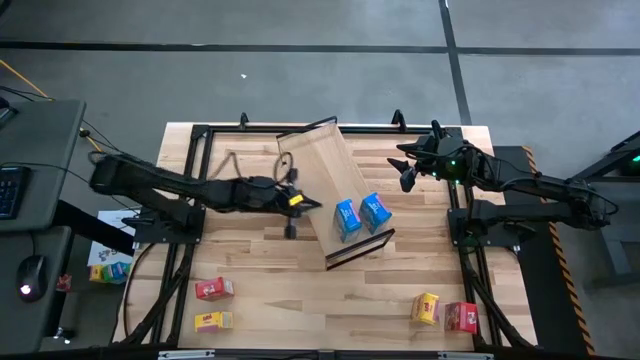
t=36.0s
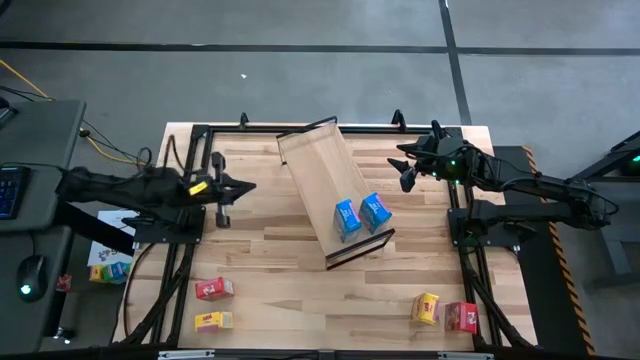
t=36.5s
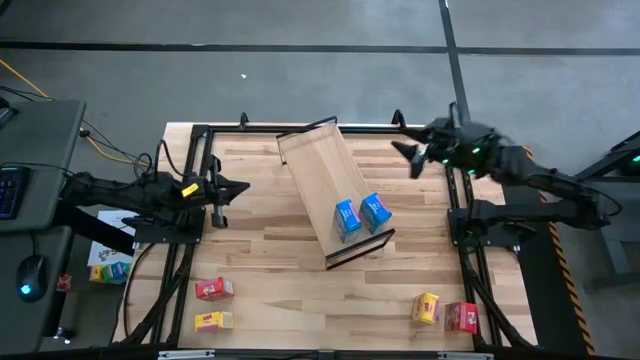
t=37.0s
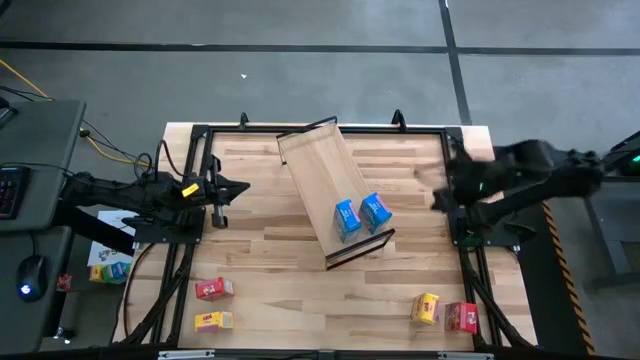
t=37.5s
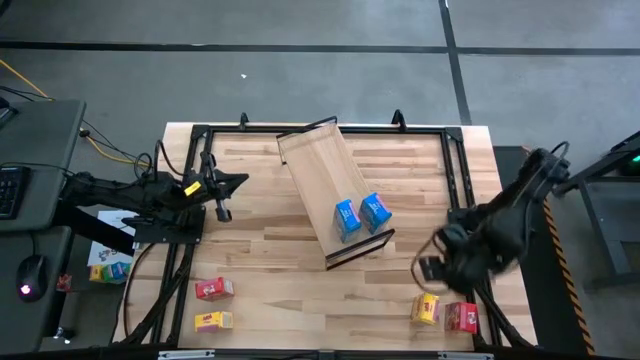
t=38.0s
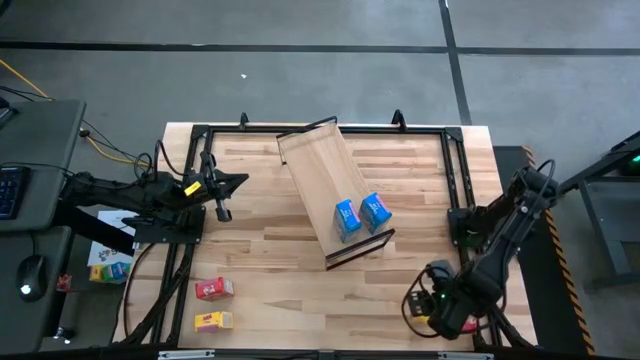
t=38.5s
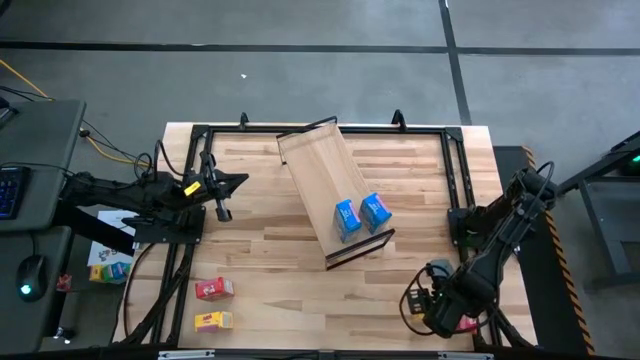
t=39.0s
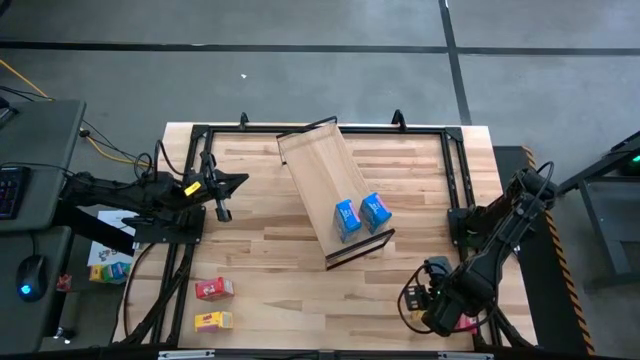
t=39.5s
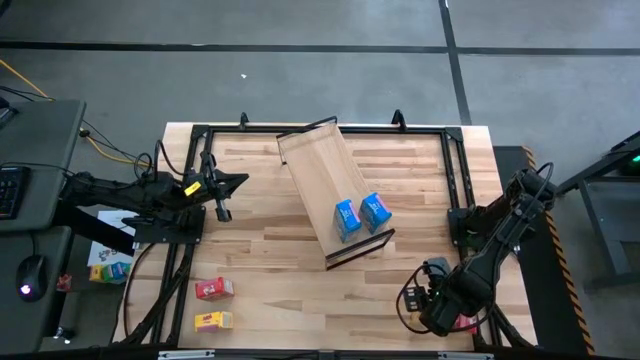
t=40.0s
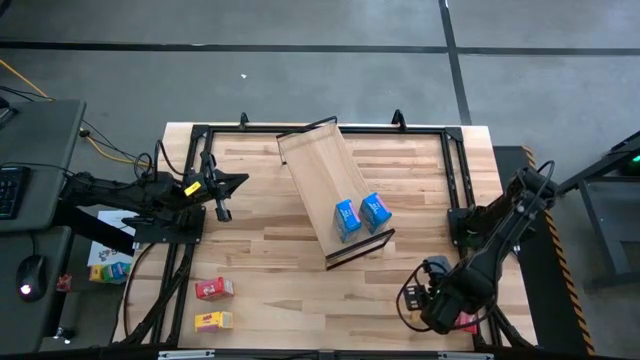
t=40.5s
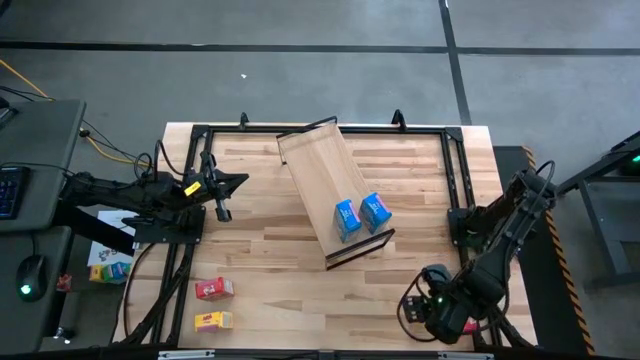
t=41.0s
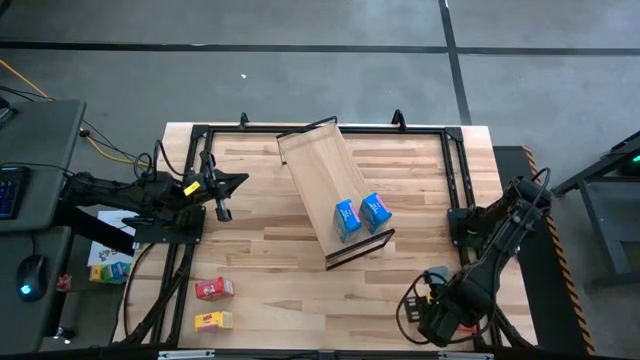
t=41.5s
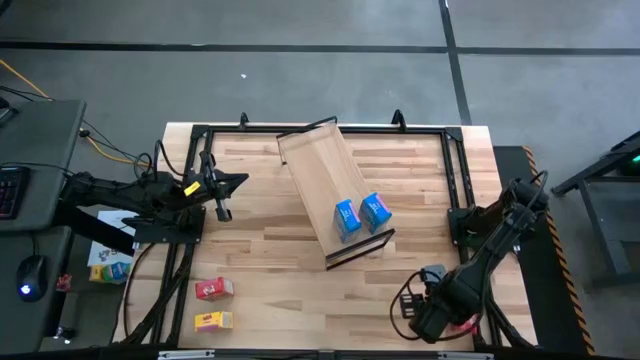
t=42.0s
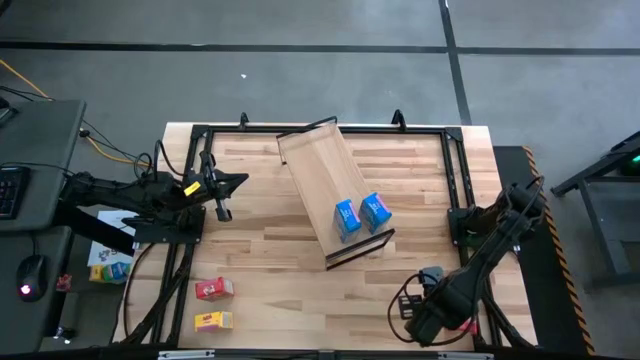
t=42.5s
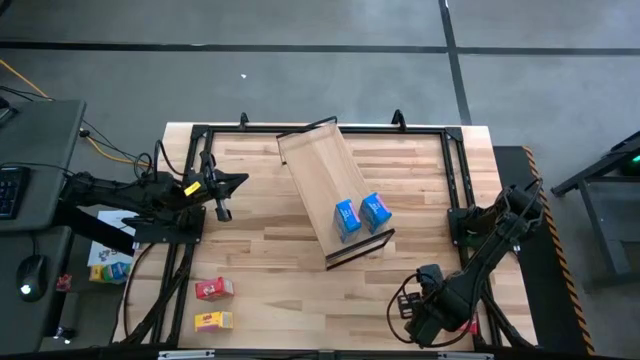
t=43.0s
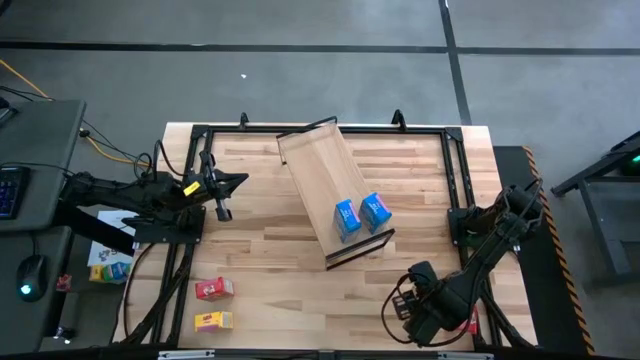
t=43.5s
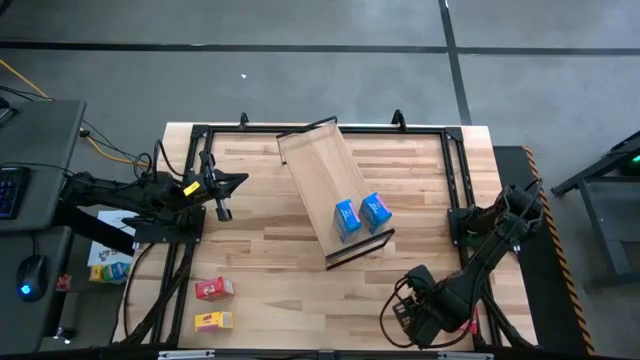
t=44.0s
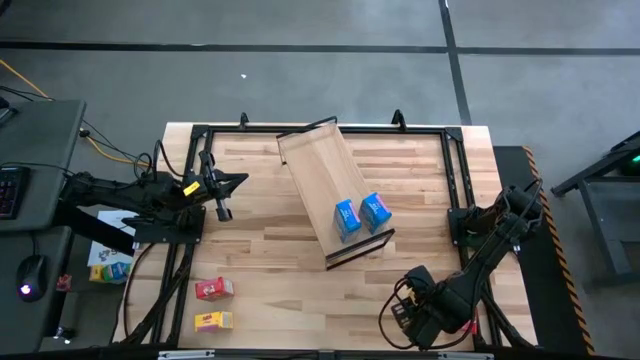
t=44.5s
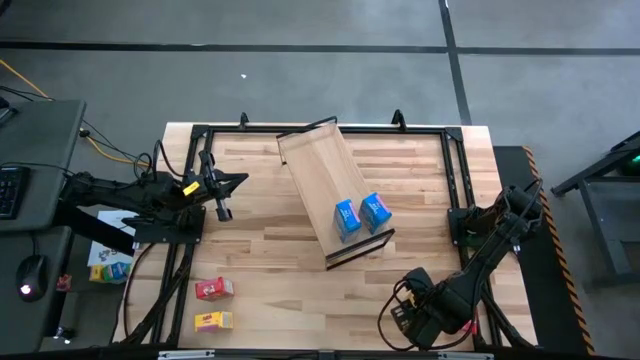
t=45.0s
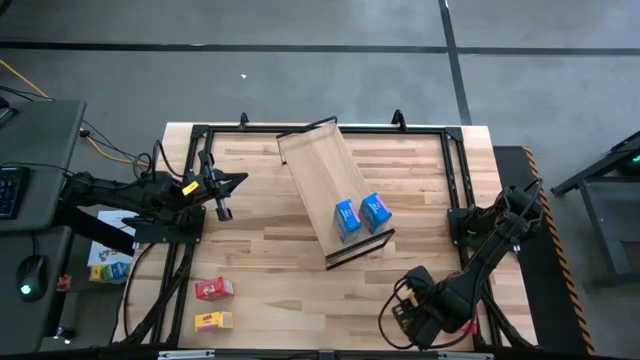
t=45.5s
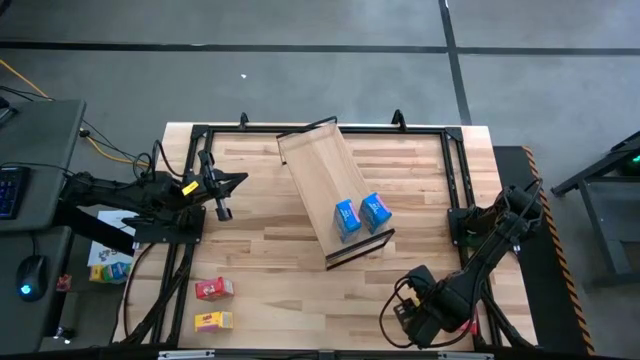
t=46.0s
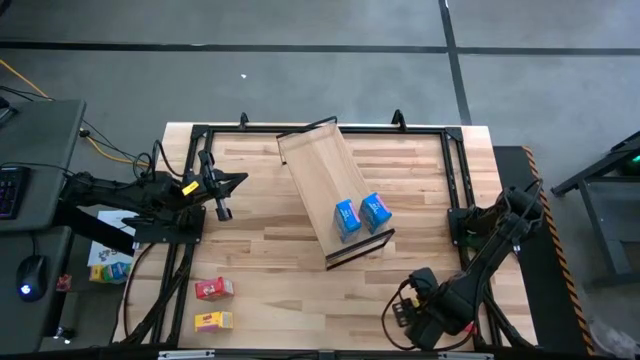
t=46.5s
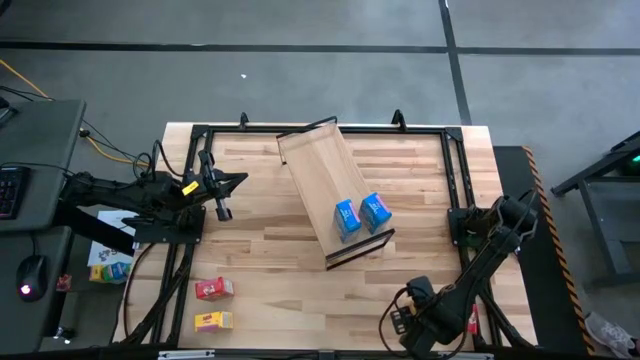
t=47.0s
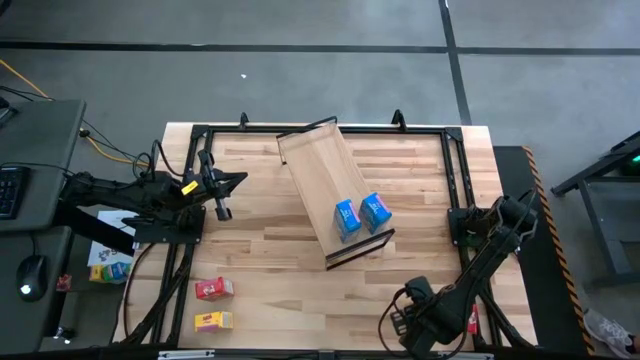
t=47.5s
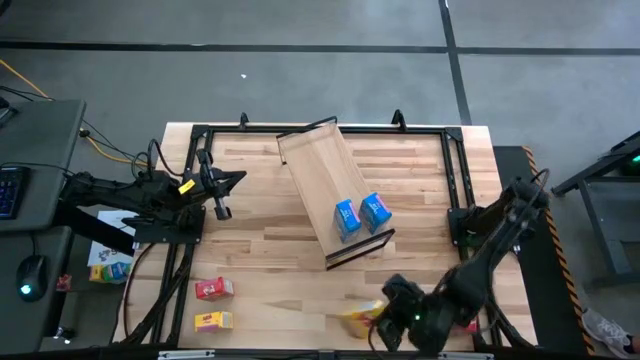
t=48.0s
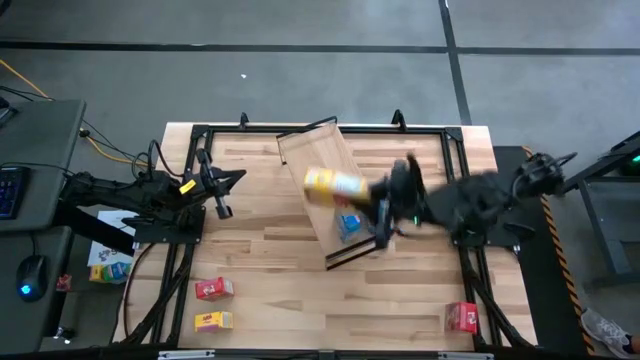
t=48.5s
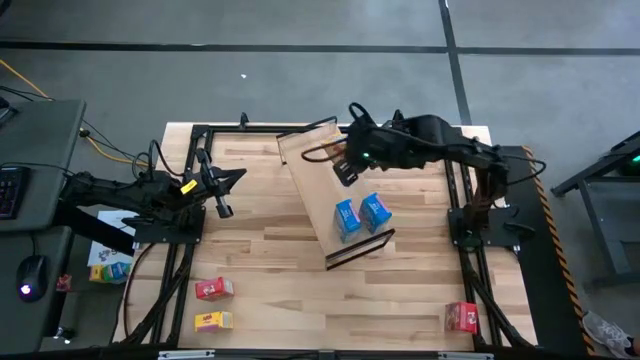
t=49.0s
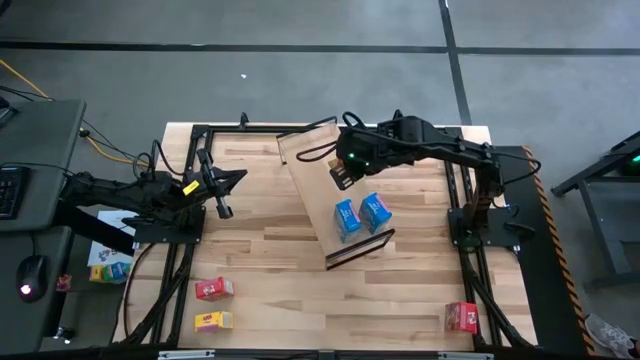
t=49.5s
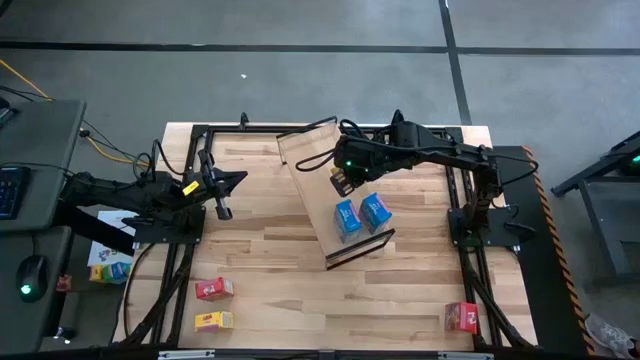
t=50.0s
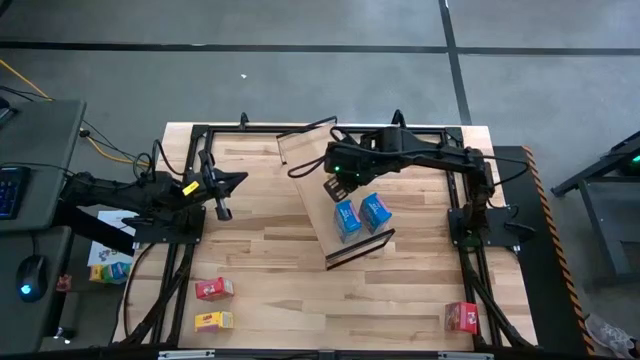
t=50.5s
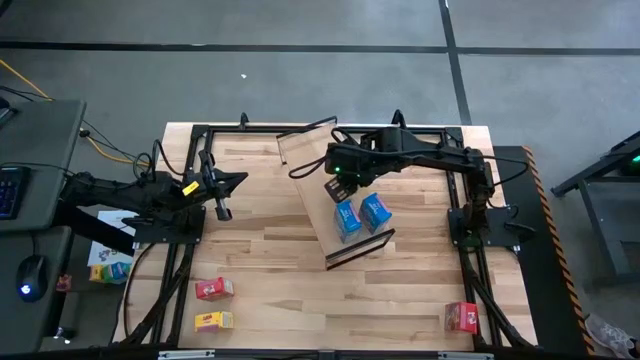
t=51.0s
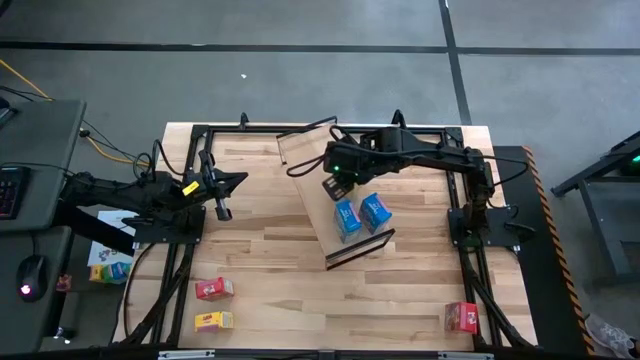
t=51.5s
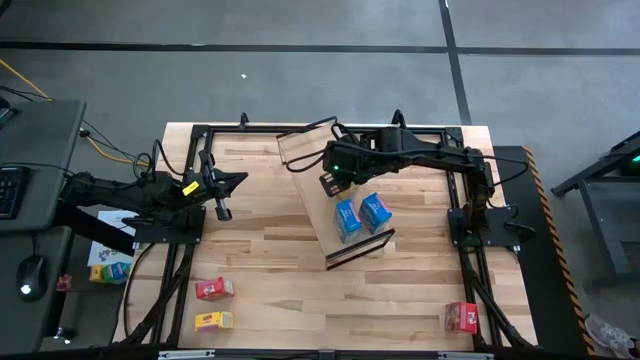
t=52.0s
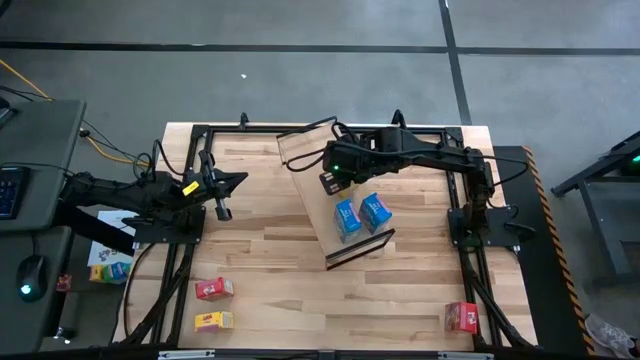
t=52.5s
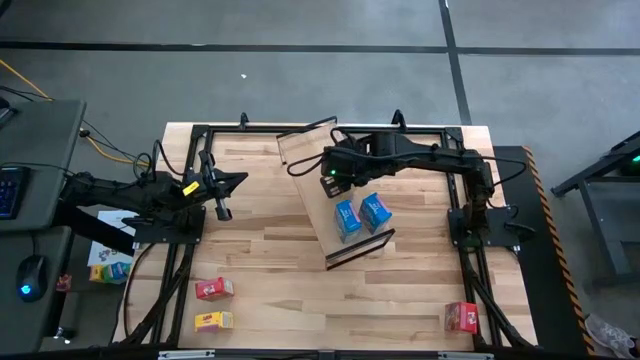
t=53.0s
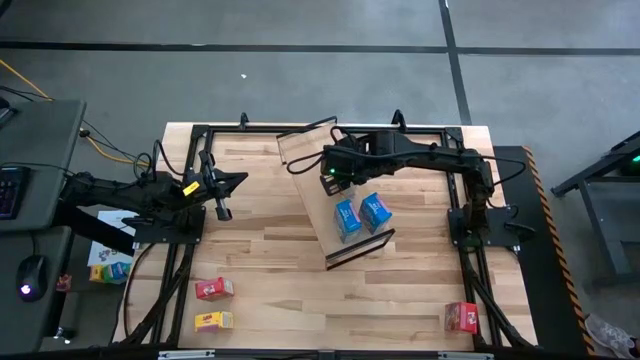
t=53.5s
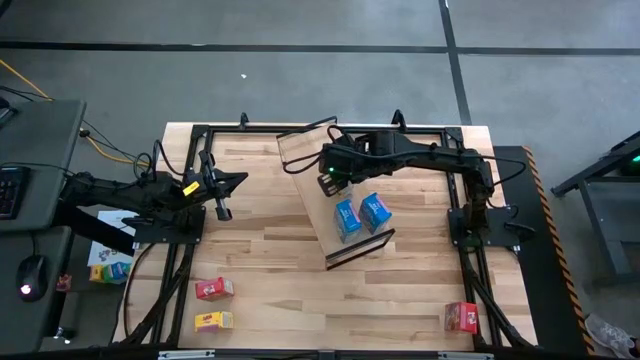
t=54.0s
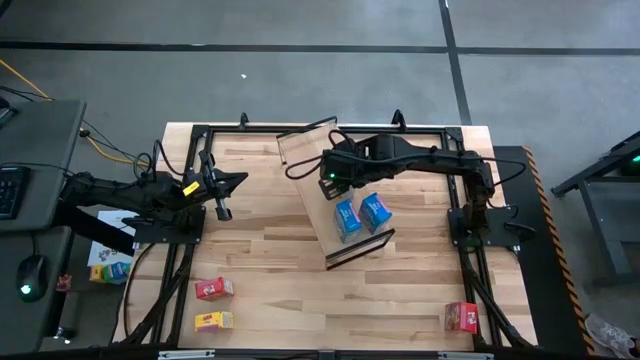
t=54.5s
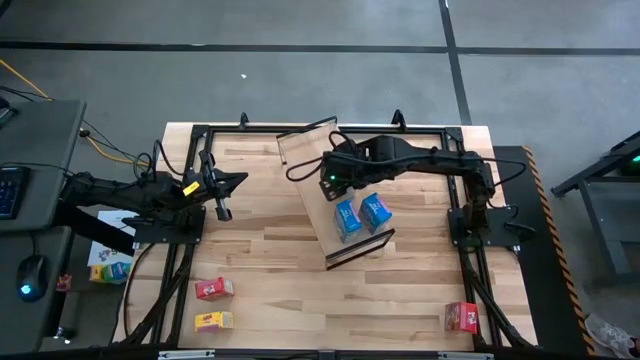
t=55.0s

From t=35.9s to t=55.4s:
Task: Stack cereal on shelf
Put the right yellow cereal box on the shelf
